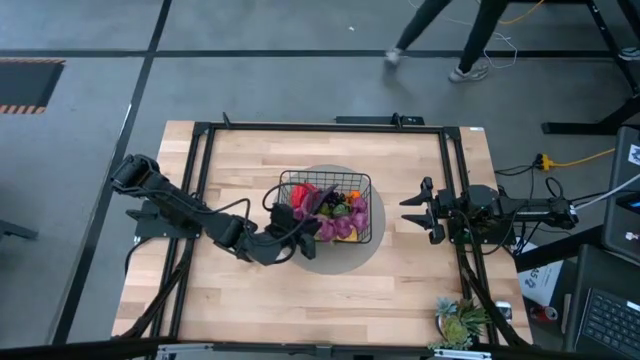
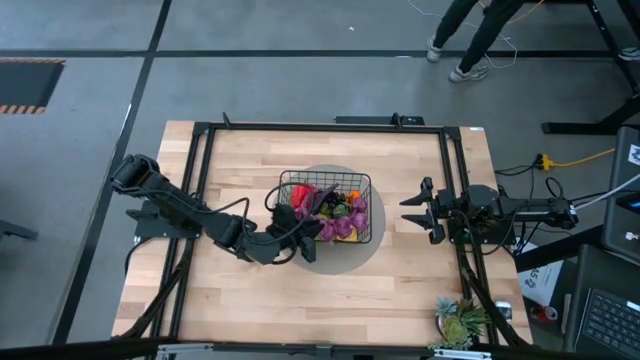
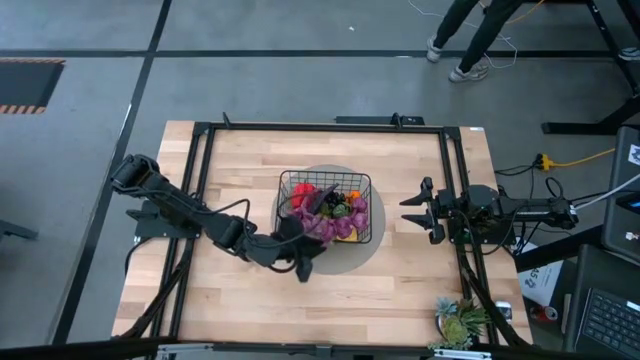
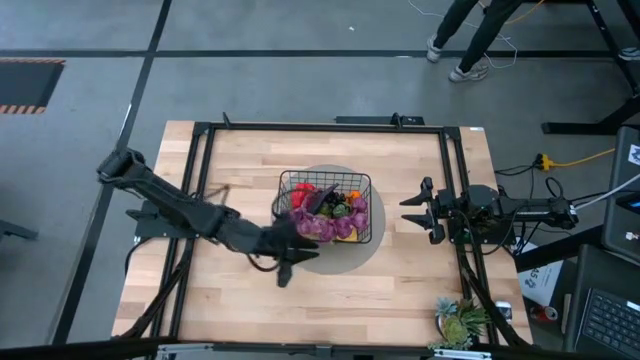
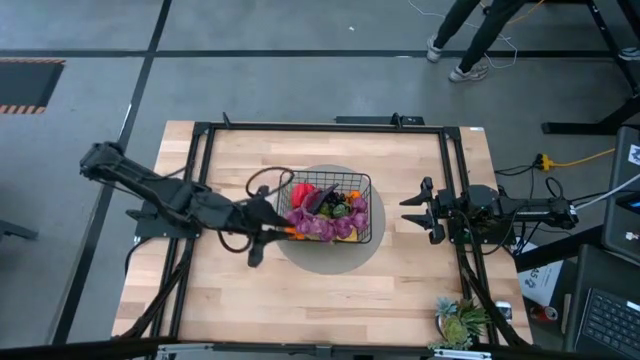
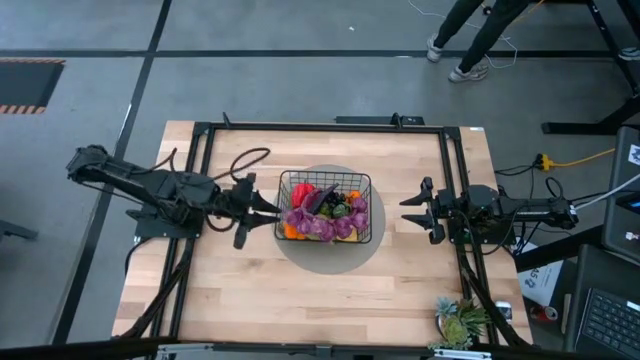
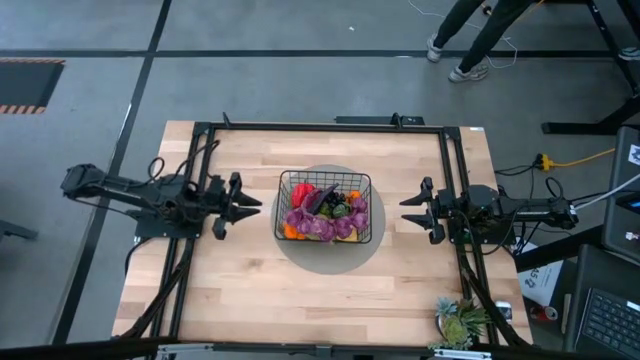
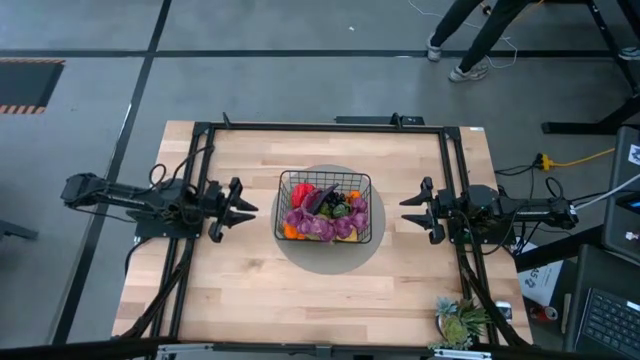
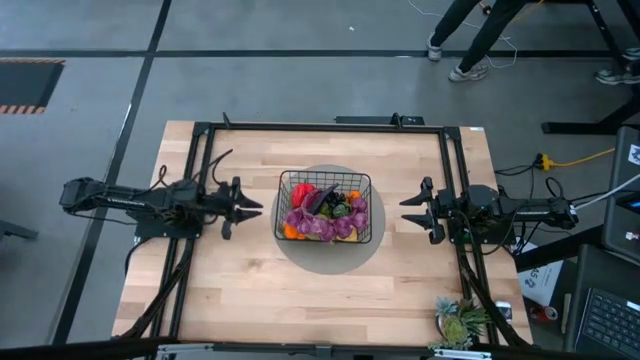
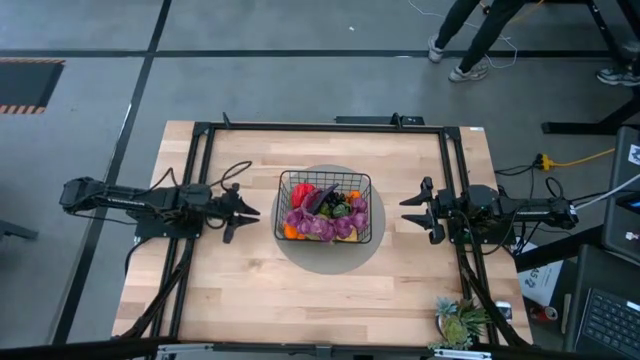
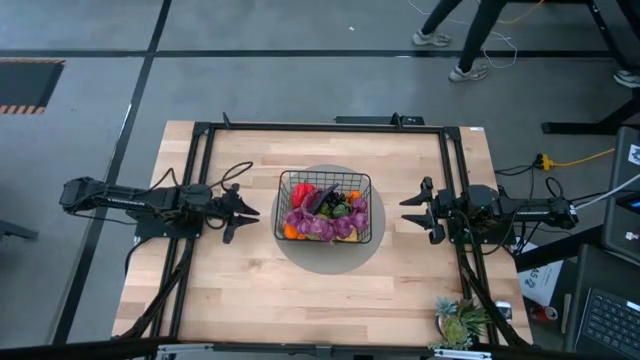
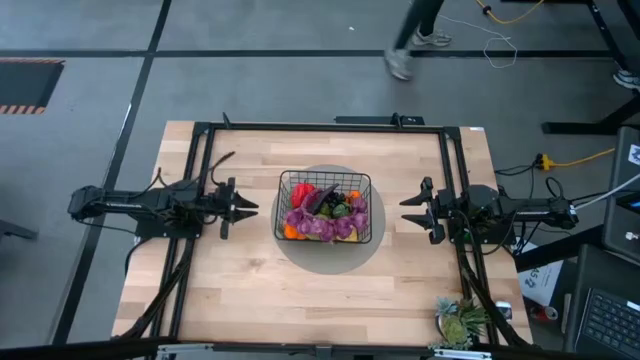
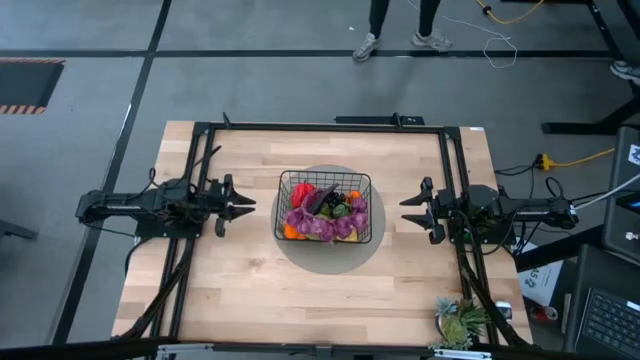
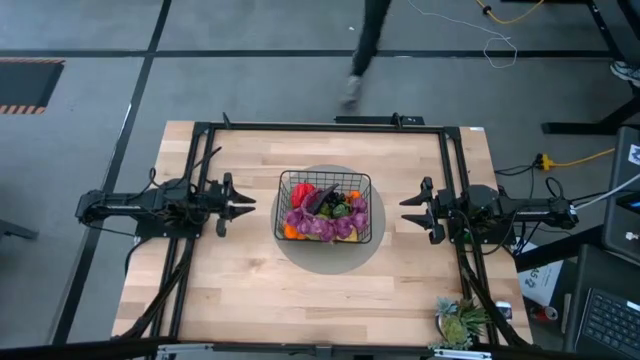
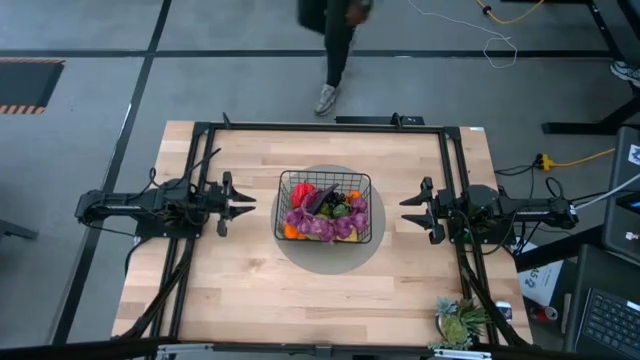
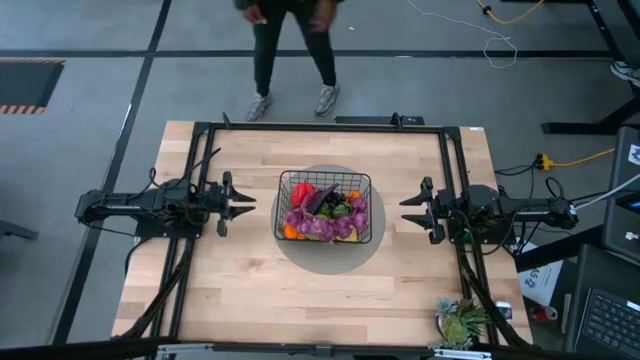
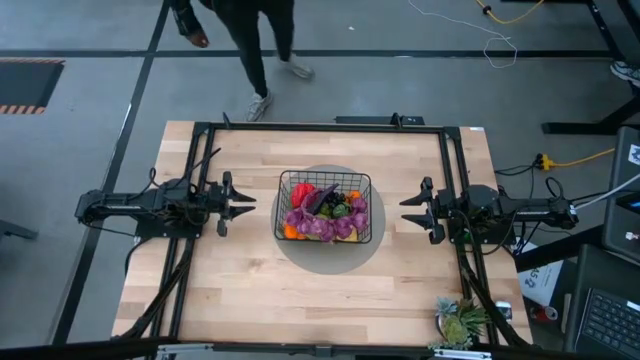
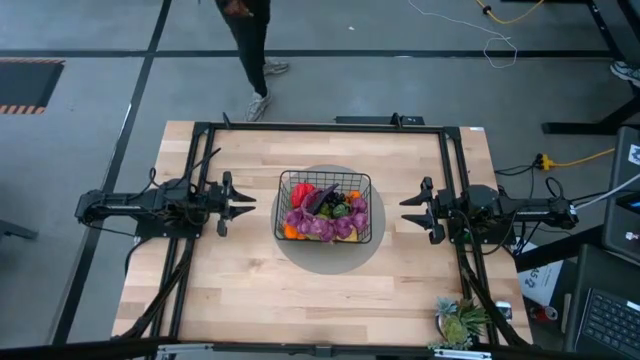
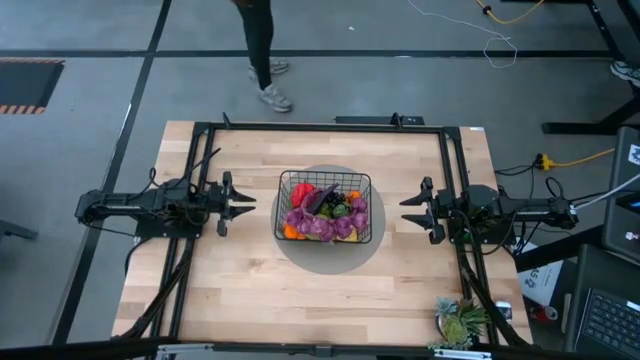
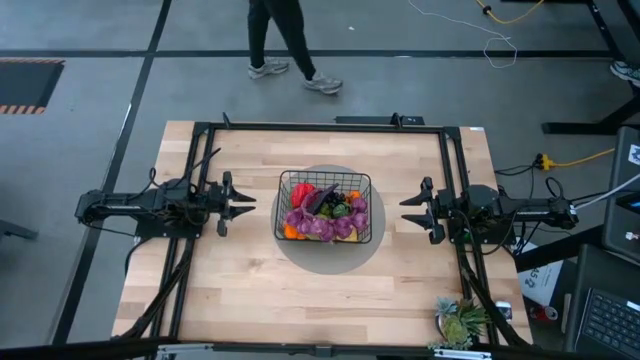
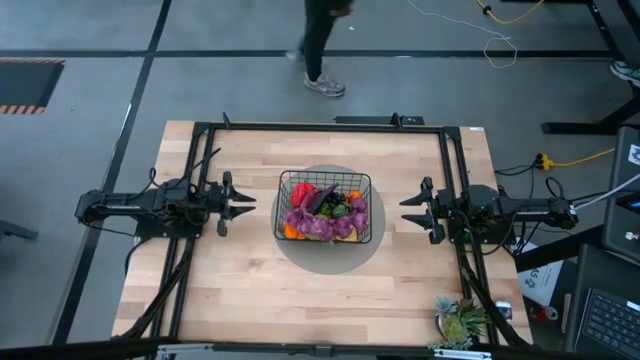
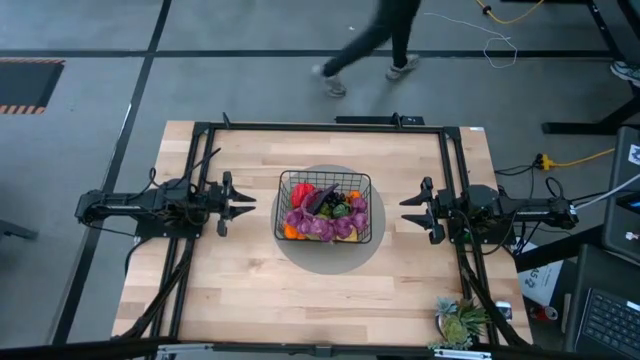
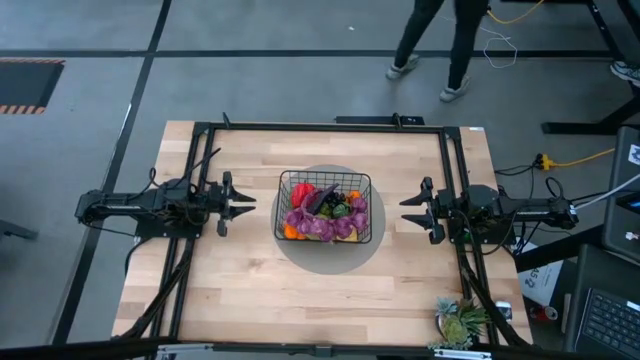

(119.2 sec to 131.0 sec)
Task: Build produce basket
Return to Home Position

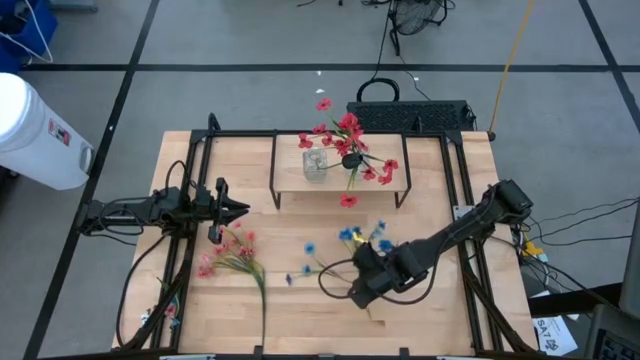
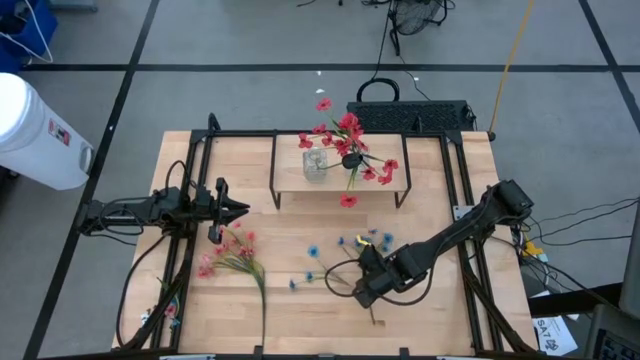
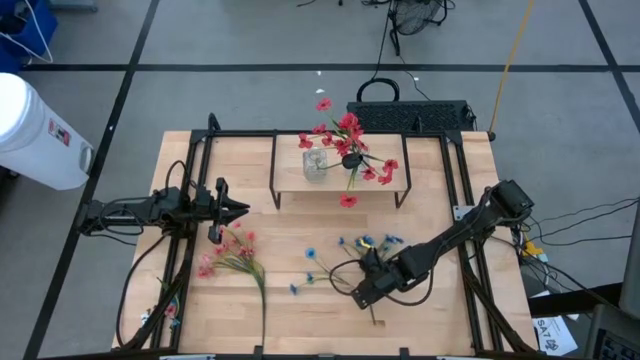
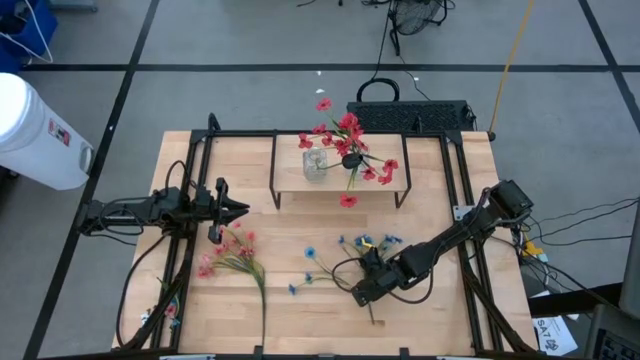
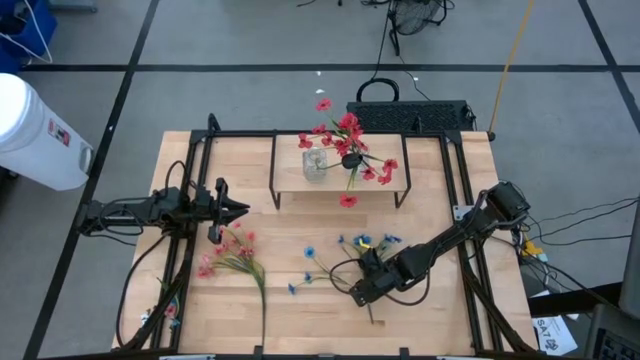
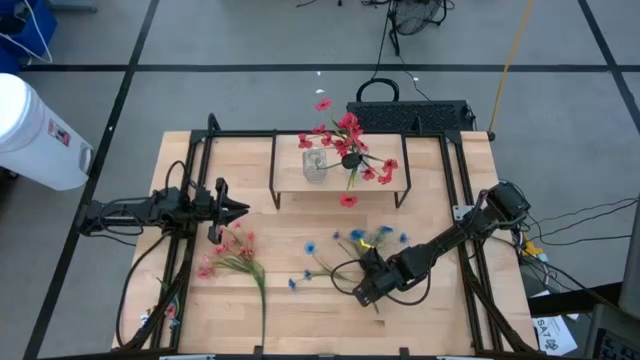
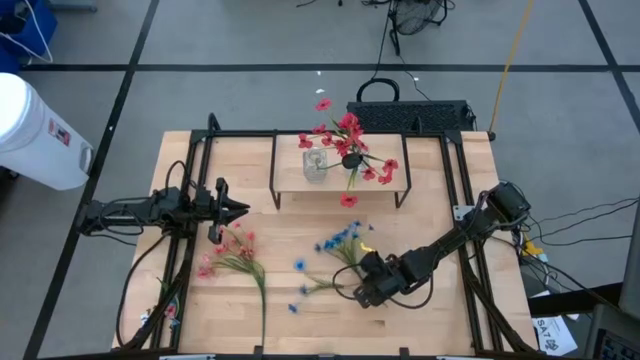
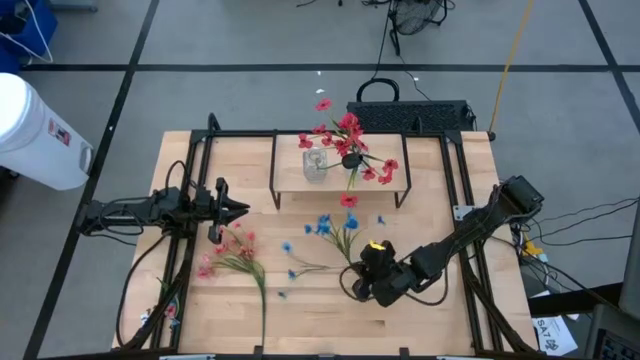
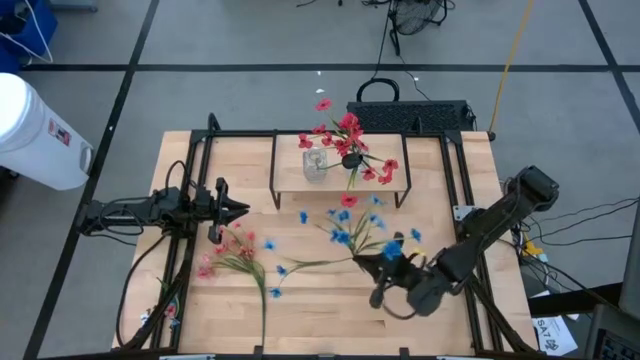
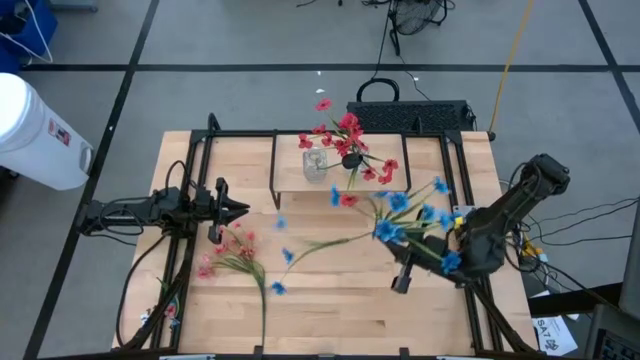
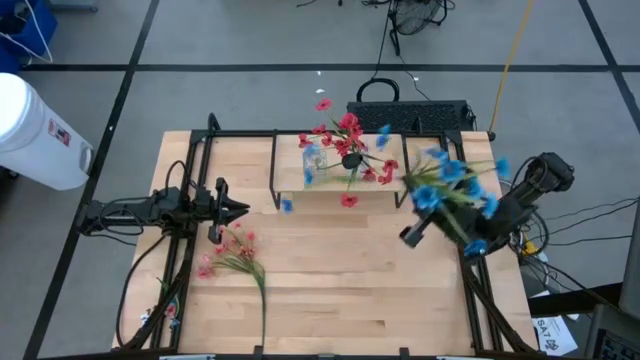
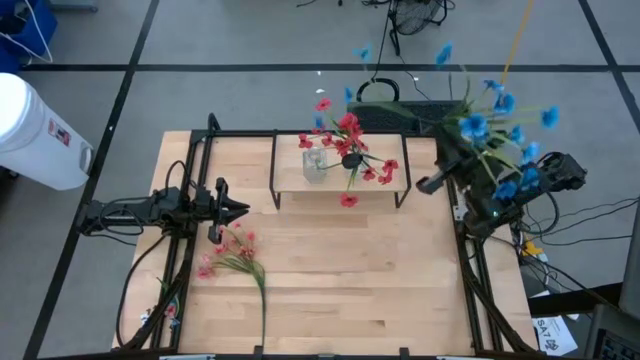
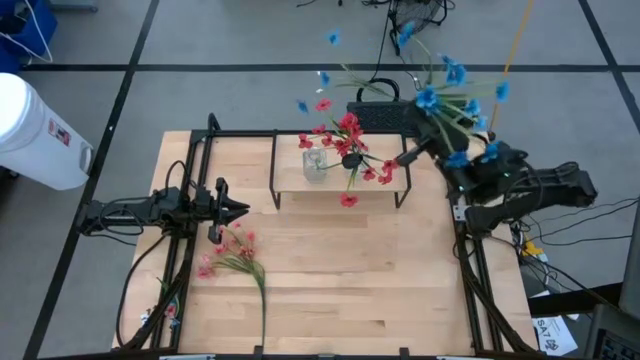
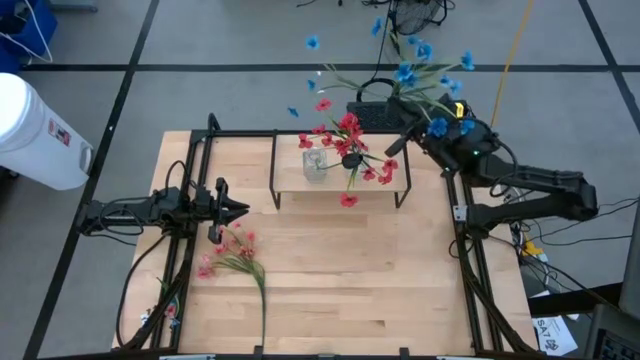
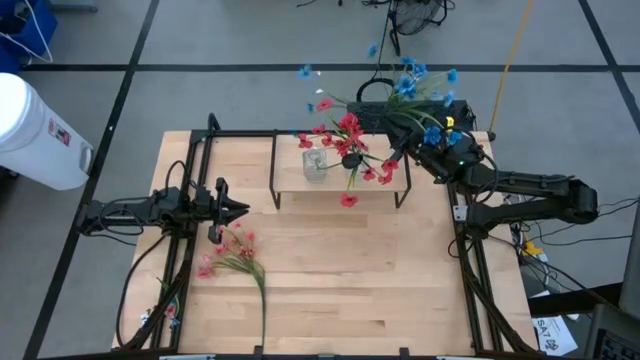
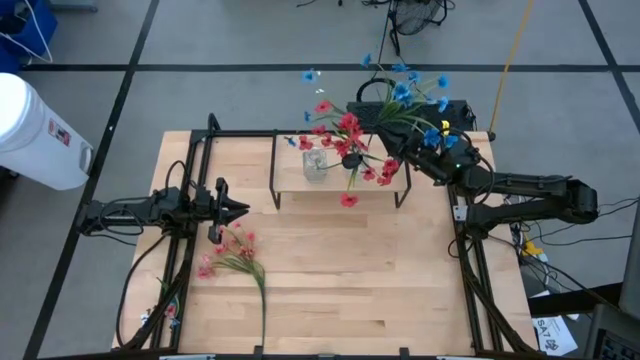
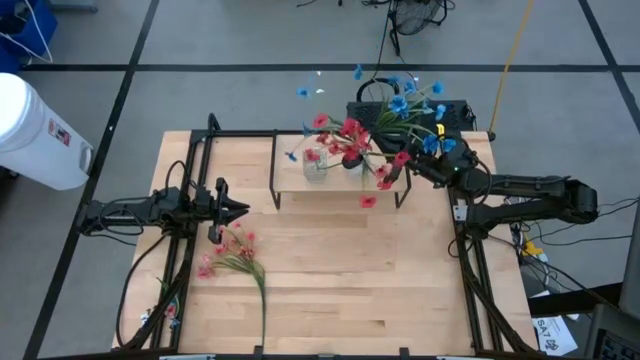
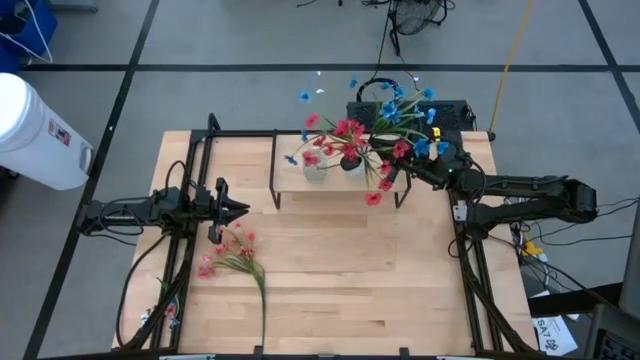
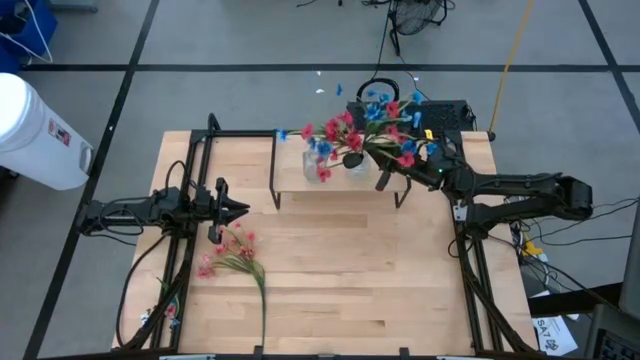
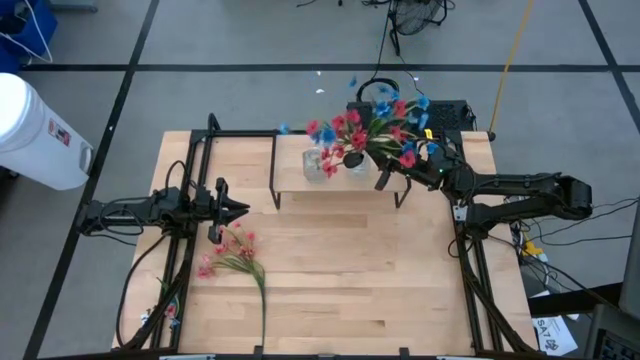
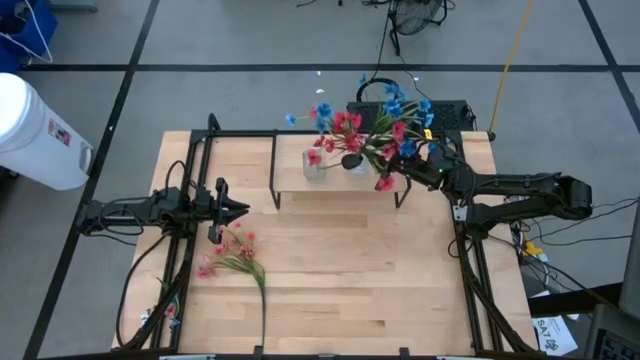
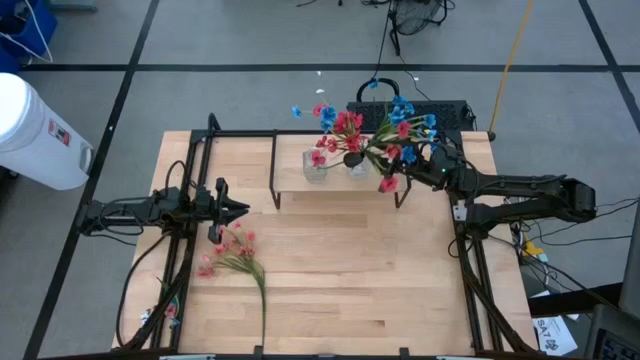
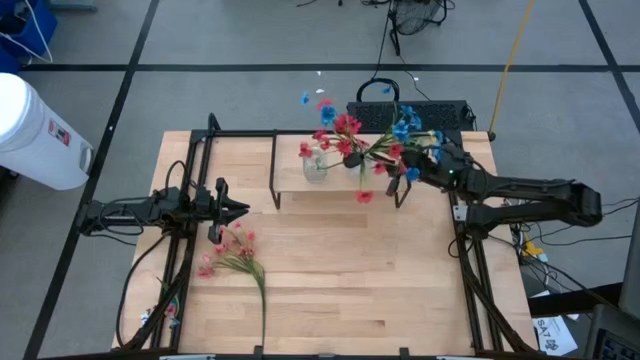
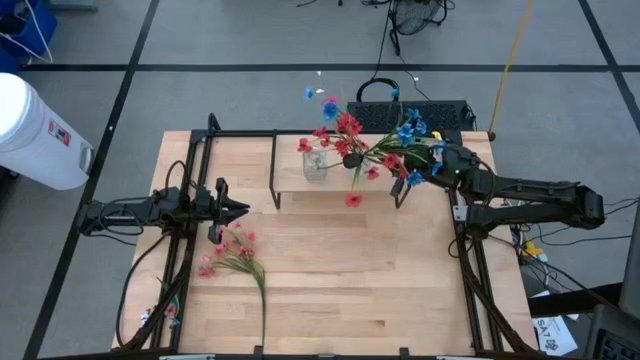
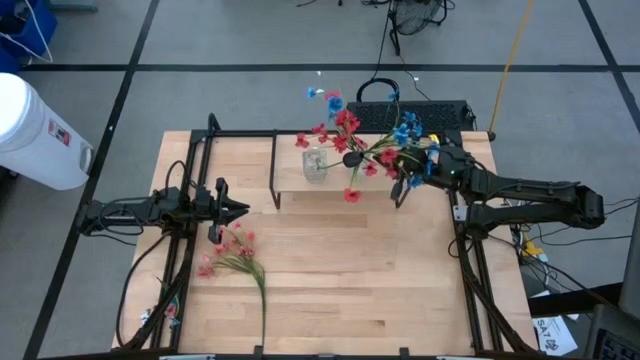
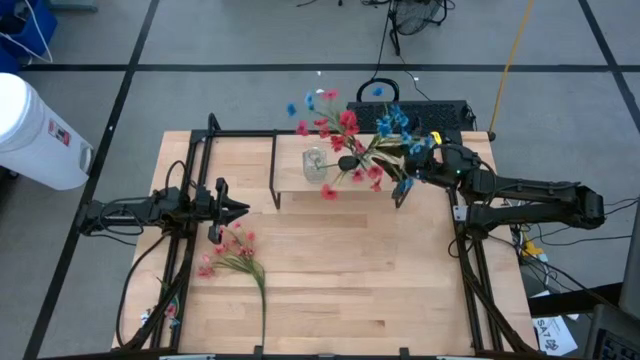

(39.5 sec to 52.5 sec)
Task: Pick and place flowers into a vace then onto a shelf
Put the blue flowers into the right transparent vase on the shelf
